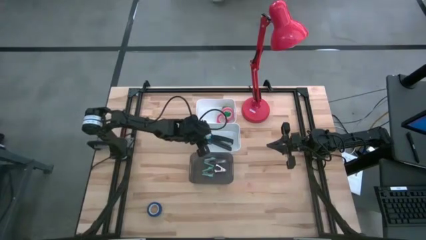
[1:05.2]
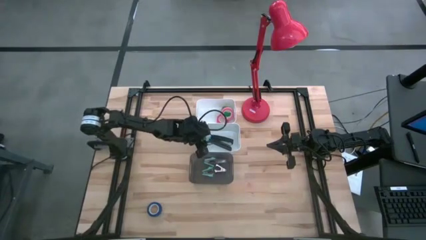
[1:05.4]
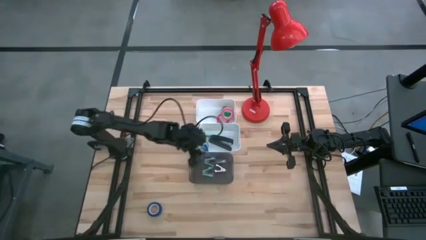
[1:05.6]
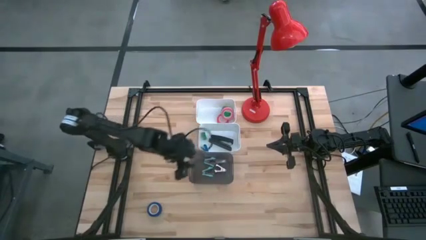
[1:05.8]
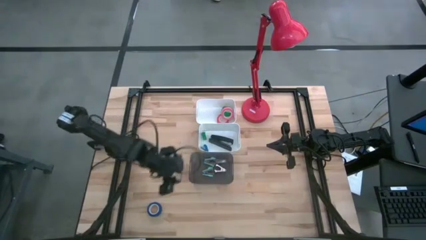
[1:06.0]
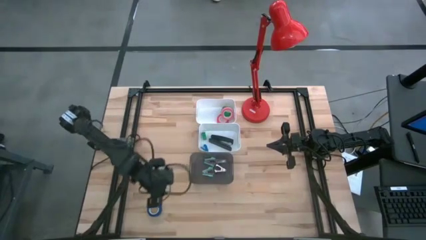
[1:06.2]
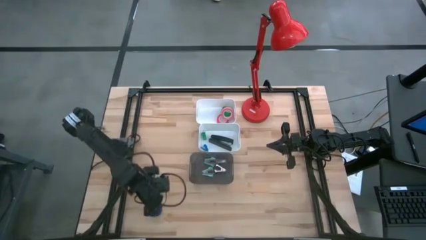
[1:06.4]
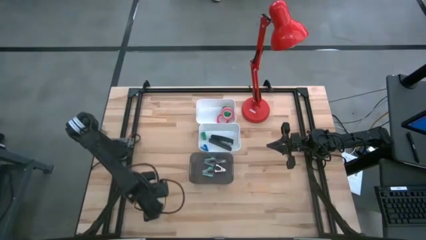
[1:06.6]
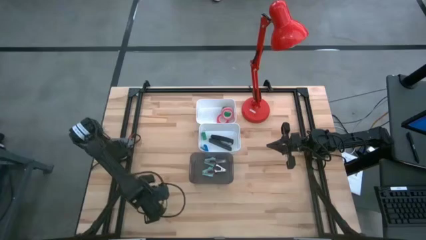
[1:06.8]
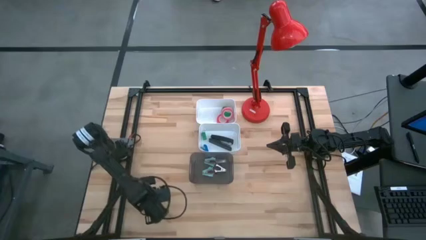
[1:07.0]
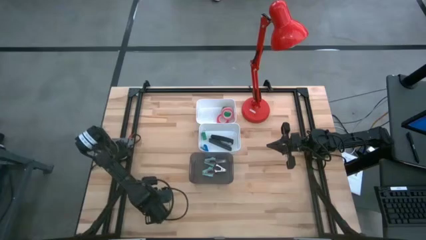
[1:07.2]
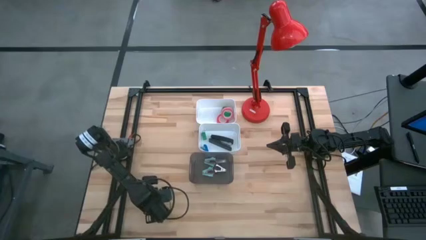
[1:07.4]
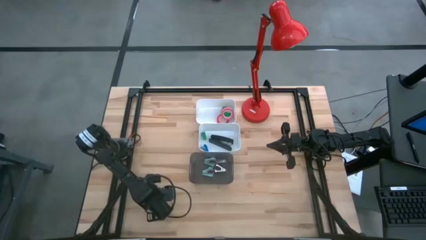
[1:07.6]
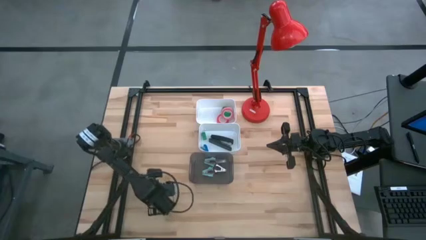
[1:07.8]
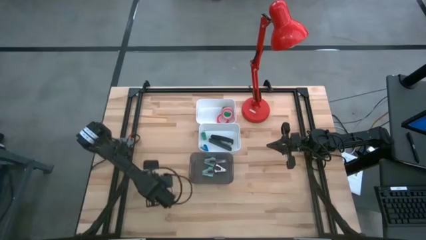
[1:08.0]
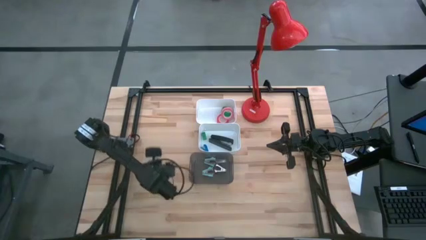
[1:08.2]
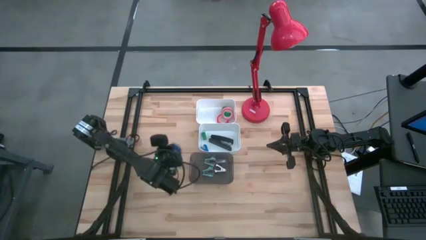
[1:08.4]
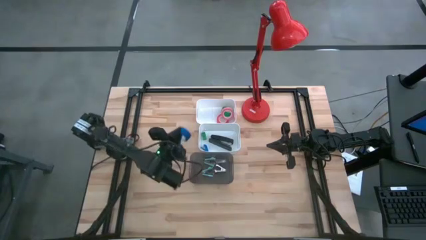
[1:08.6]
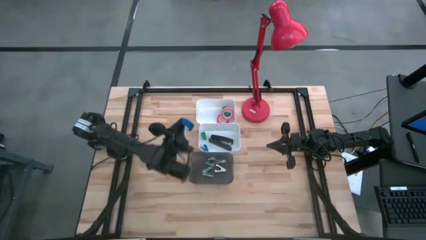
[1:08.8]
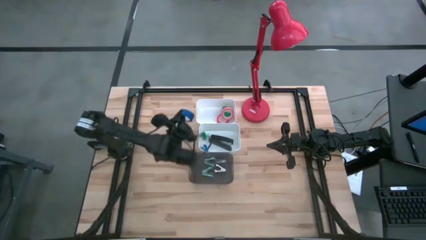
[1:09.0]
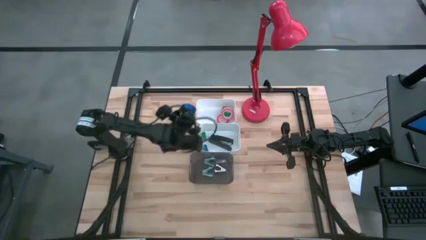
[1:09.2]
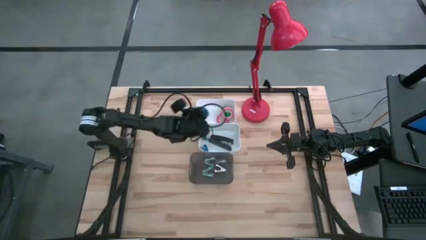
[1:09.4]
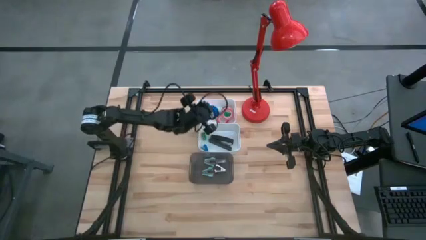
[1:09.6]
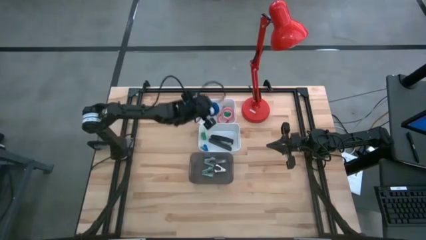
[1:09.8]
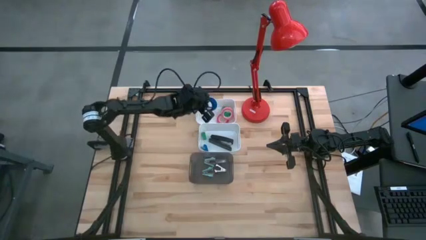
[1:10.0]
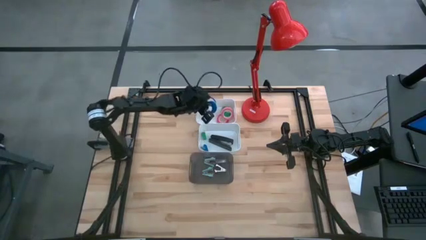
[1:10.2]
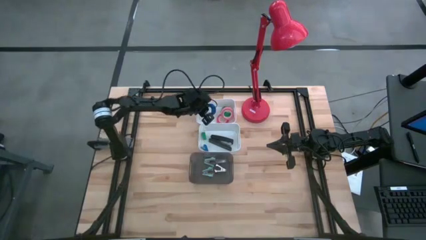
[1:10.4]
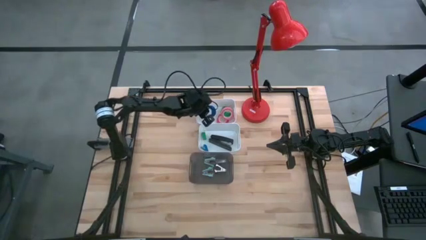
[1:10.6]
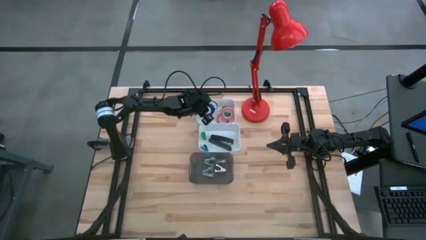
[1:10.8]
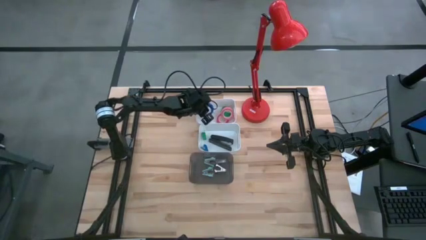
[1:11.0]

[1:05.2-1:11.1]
Task: Pick and place Stapler, Stapler remover, tape
Put the blue tape into the top white bin

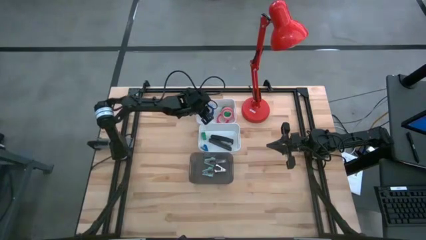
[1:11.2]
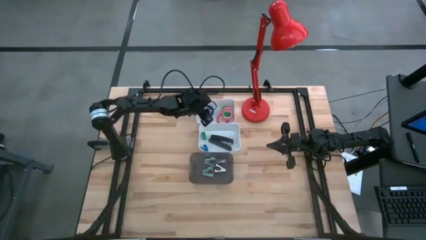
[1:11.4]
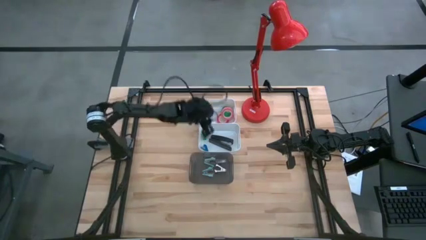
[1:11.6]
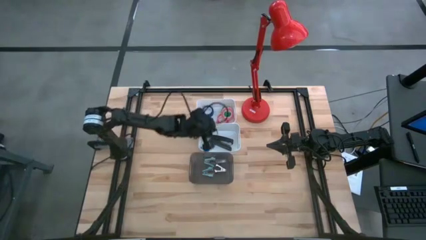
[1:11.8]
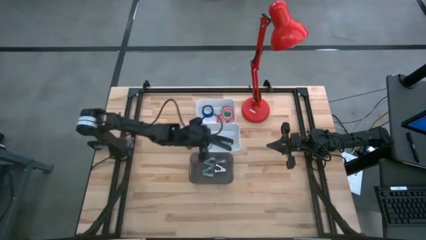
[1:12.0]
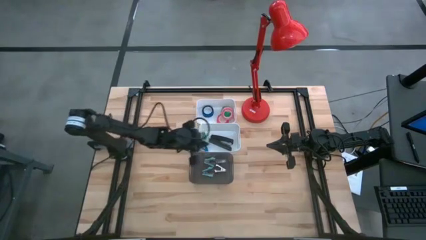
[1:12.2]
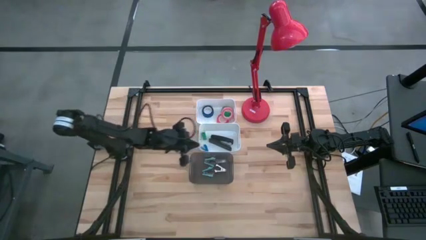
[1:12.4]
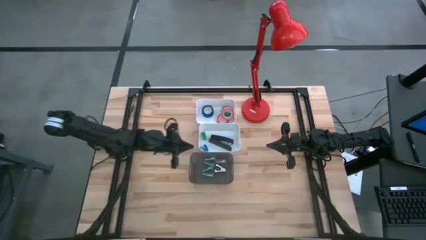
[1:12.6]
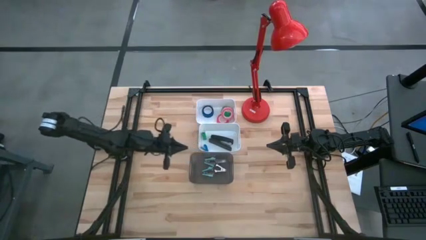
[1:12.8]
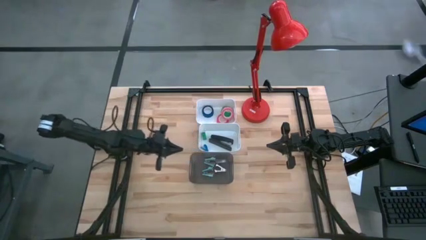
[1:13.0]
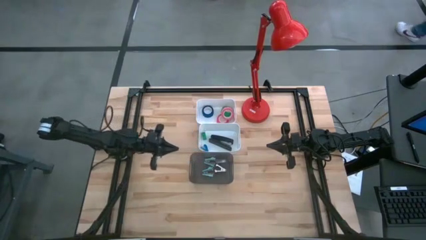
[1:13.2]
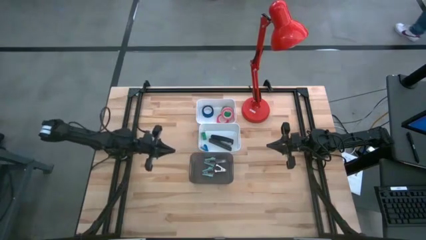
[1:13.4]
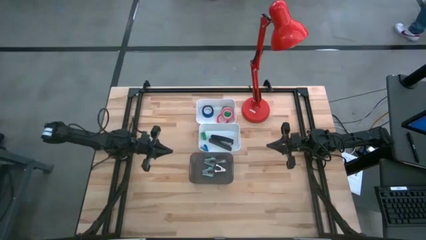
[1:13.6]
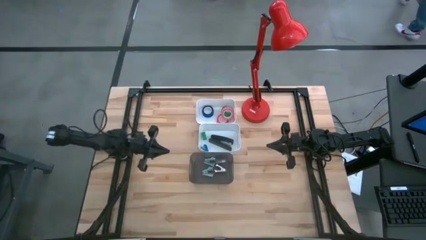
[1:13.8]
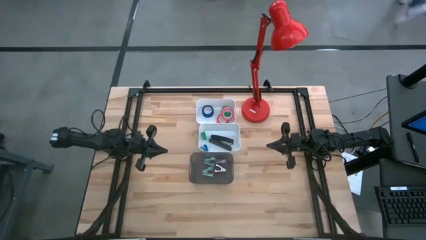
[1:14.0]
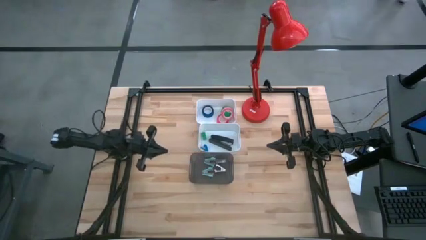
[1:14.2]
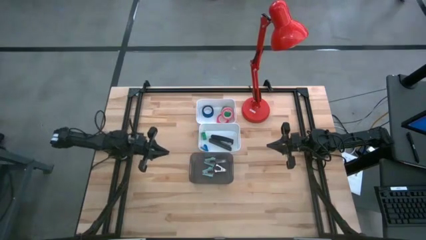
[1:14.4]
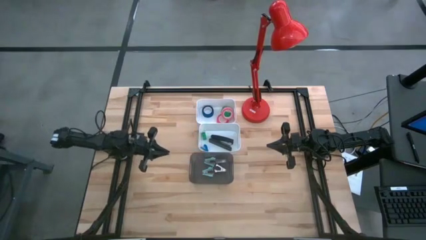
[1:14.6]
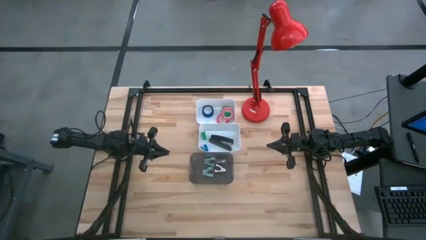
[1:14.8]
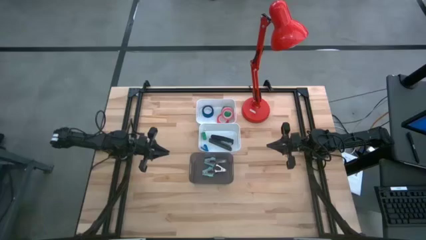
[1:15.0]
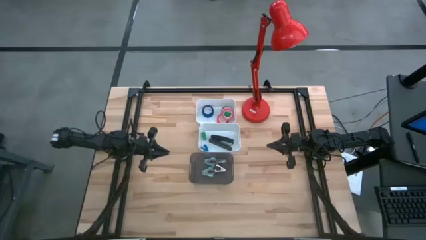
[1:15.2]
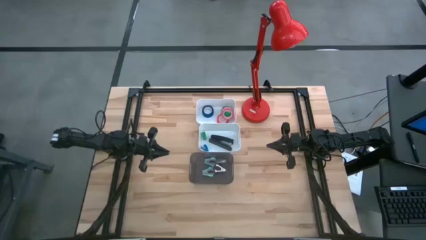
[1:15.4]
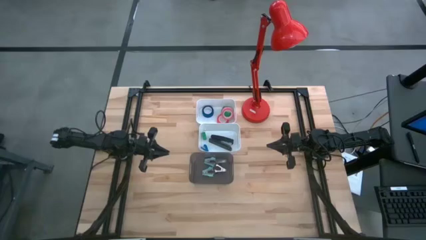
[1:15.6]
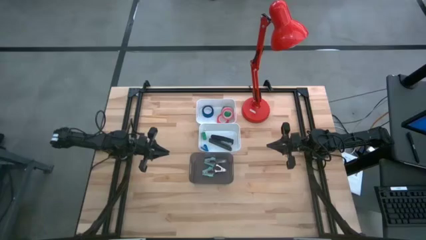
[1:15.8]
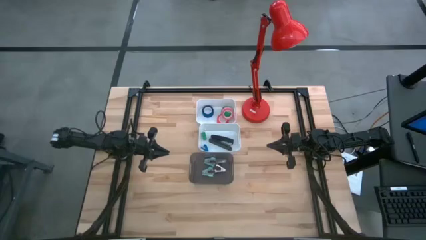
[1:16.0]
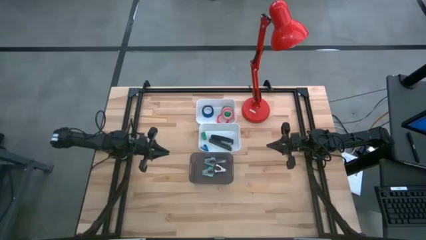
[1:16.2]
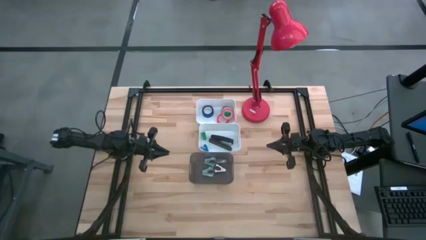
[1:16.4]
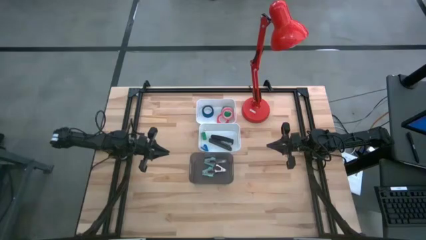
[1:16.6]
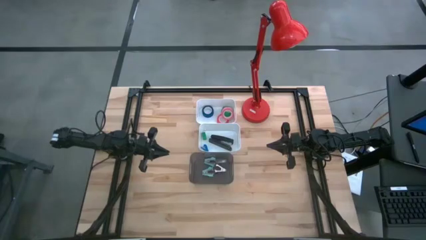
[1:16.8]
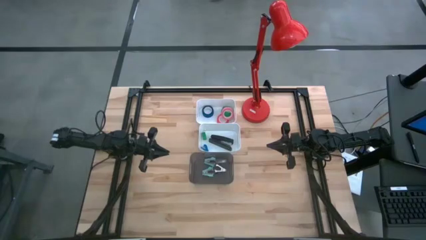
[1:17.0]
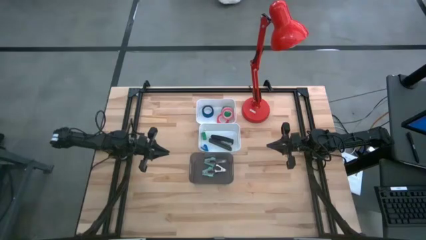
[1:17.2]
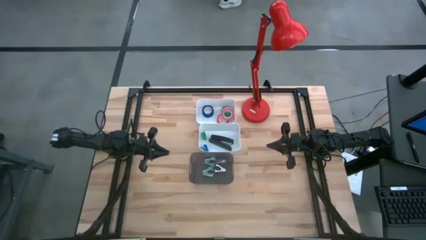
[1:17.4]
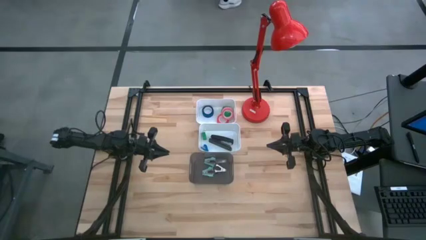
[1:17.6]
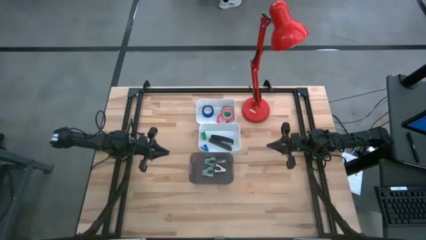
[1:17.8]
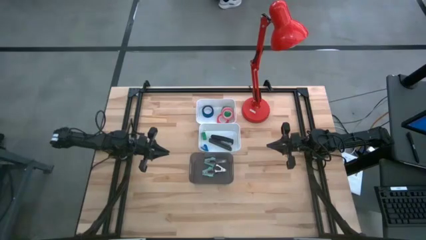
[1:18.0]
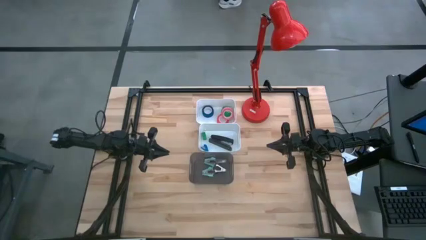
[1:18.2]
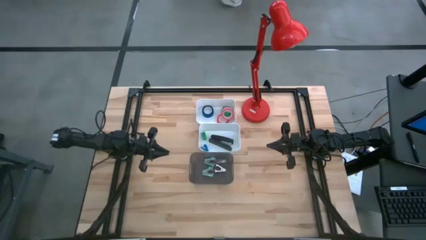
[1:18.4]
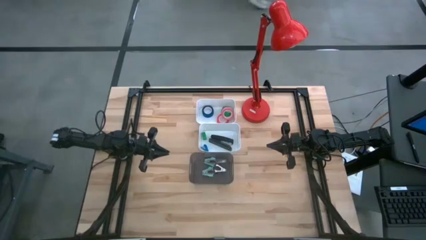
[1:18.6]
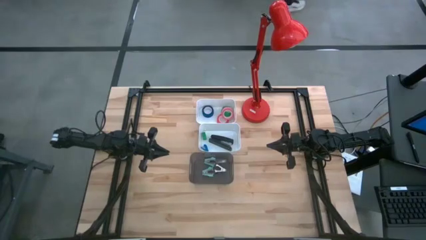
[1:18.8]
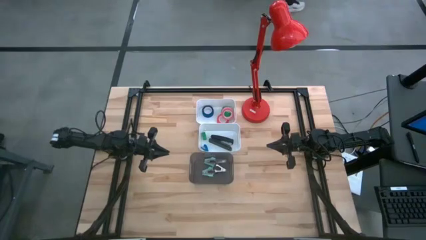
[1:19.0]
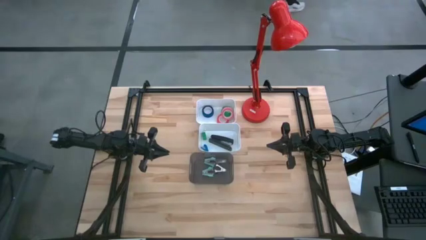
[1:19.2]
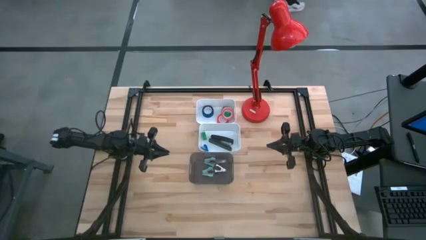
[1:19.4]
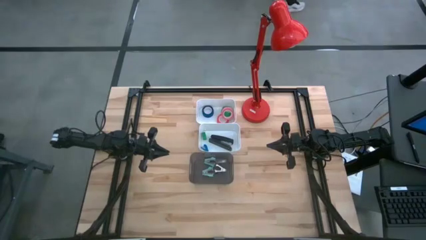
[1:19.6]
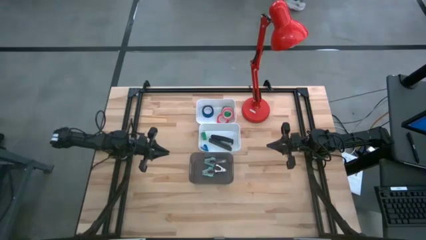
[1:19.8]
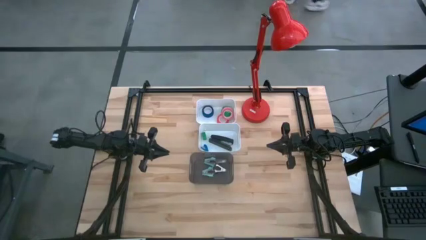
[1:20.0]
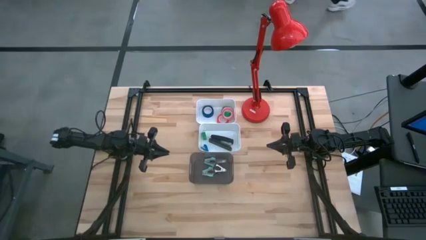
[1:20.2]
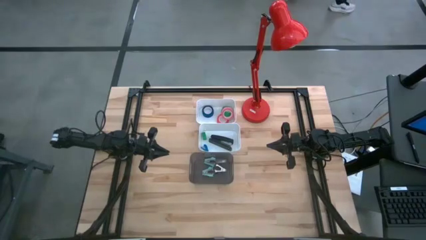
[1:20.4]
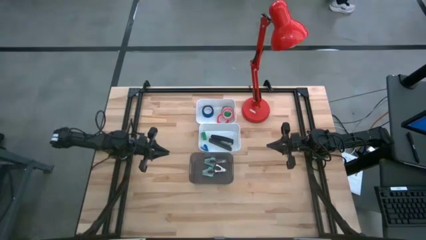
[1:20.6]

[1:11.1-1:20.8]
Return to Home Position

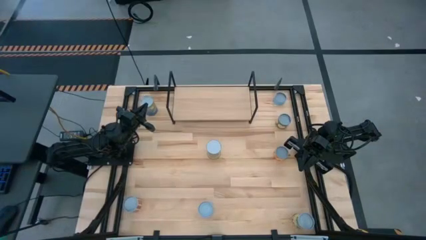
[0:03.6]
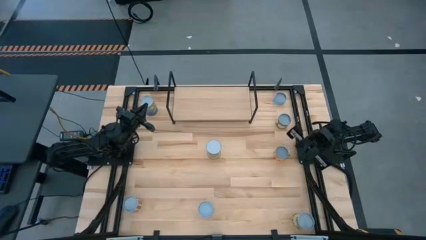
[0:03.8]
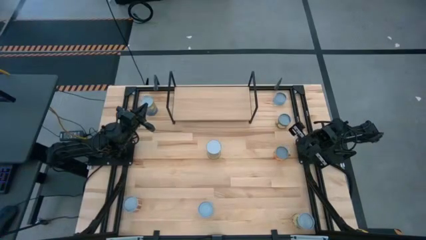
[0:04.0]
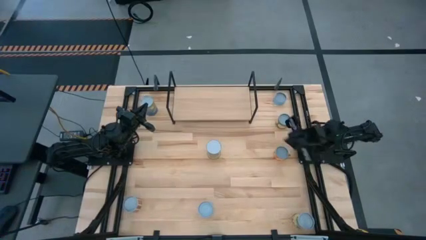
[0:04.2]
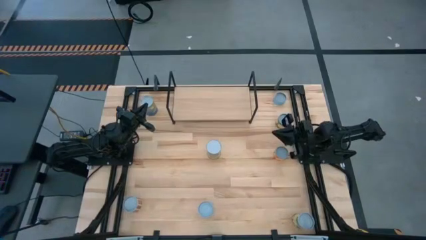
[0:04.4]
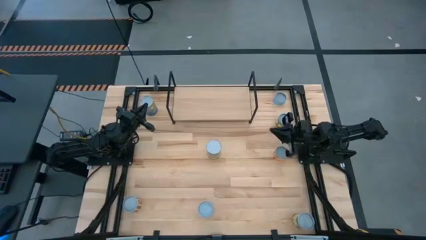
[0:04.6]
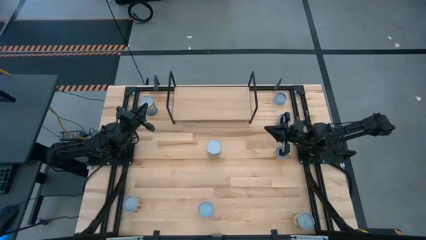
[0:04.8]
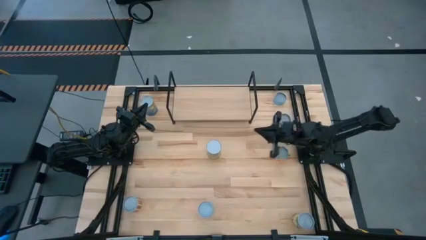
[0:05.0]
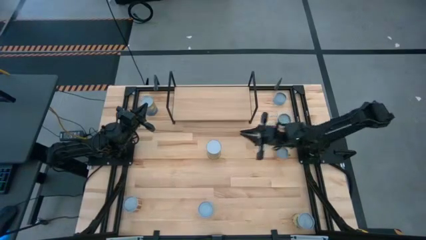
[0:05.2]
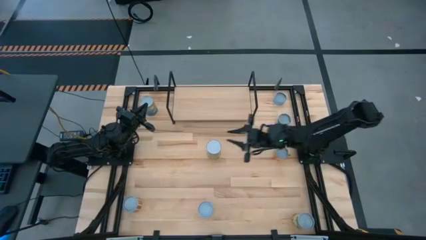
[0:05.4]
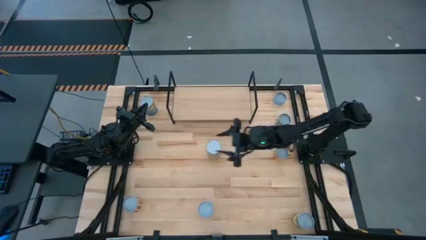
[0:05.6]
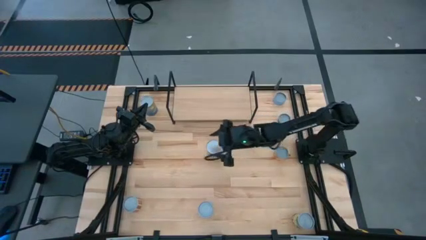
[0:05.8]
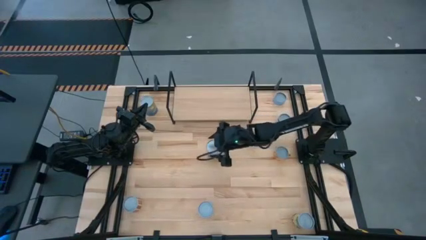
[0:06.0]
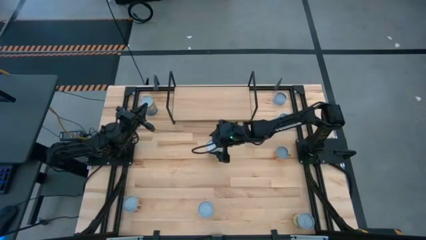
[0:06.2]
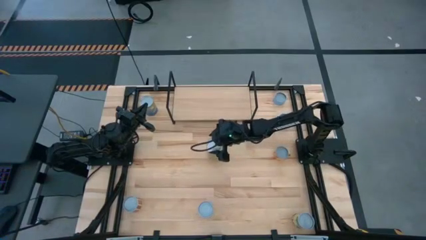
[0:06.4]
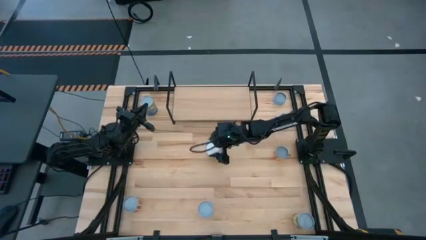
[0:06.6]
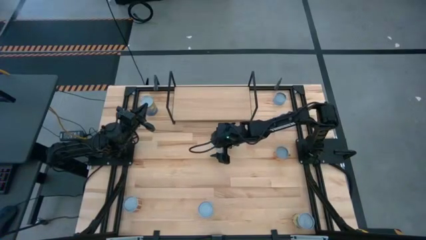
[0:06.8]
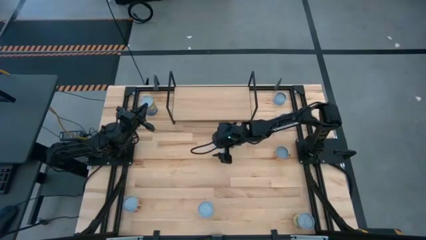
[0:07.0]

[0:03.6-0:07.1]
Task: Pick and place cans onto a shelf
Put the canned carrots on the shelf
